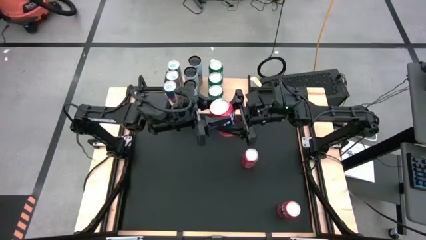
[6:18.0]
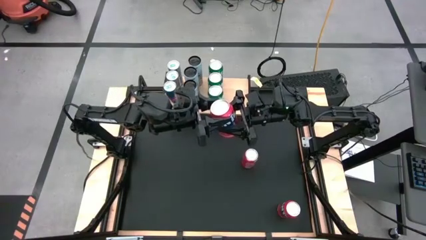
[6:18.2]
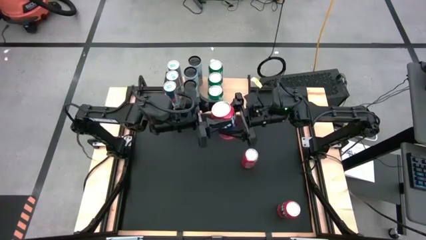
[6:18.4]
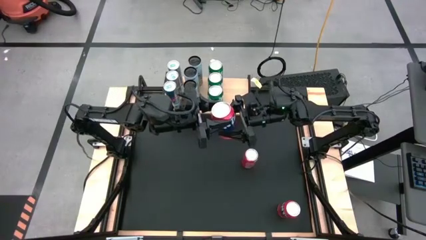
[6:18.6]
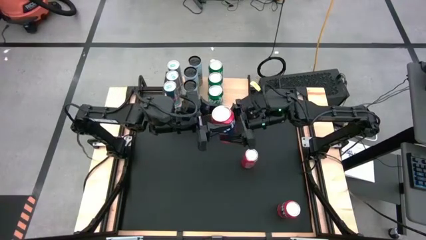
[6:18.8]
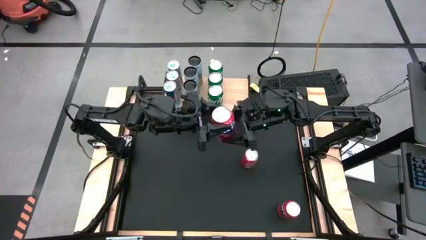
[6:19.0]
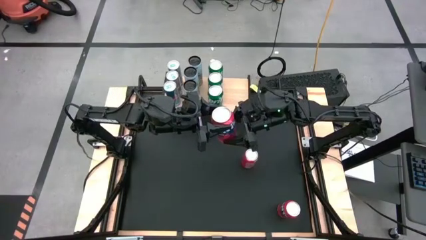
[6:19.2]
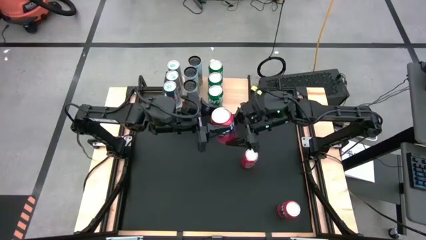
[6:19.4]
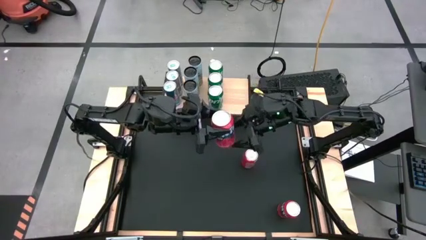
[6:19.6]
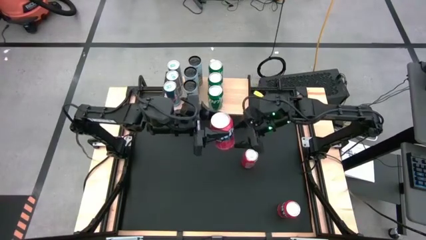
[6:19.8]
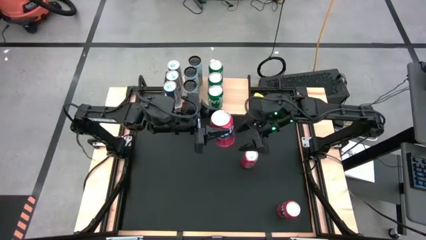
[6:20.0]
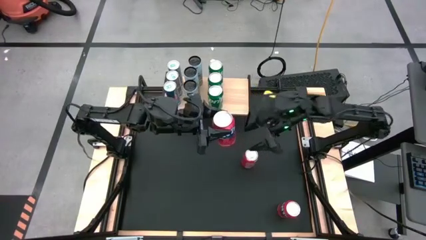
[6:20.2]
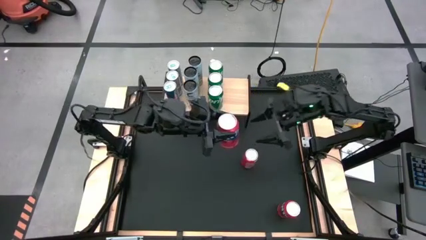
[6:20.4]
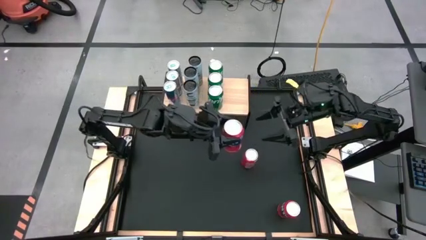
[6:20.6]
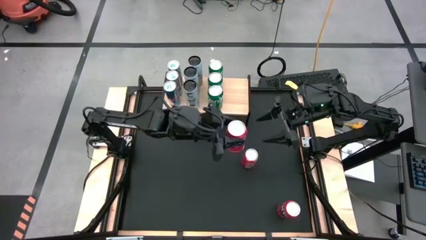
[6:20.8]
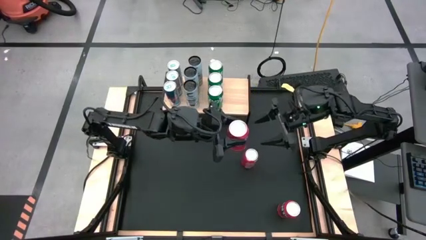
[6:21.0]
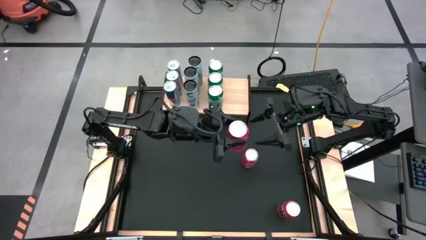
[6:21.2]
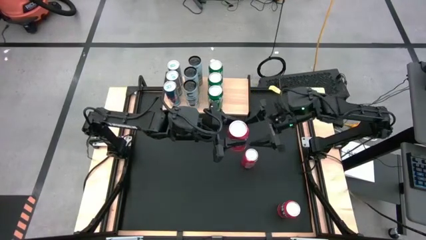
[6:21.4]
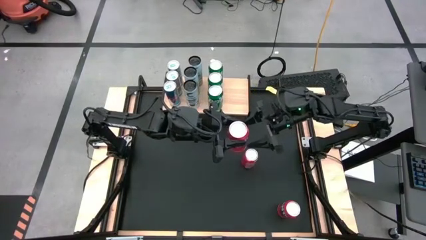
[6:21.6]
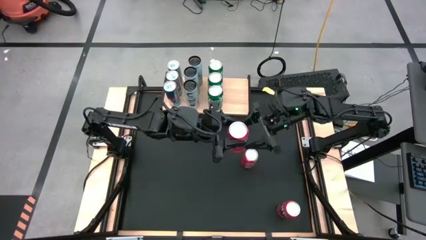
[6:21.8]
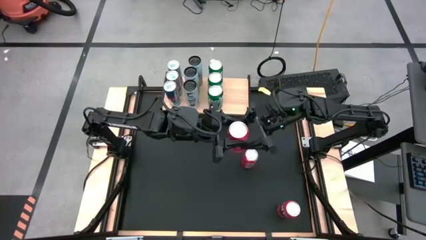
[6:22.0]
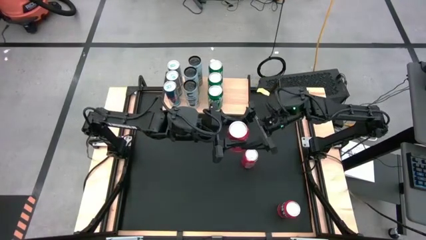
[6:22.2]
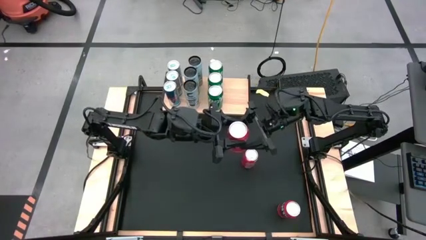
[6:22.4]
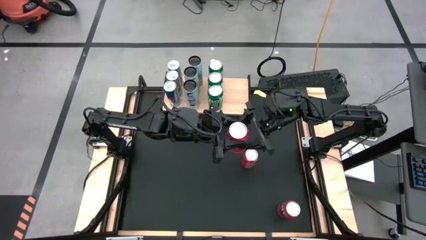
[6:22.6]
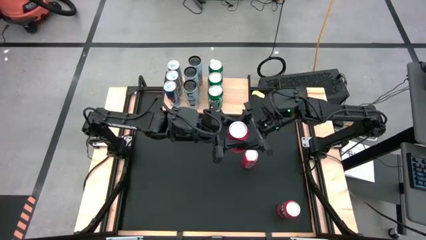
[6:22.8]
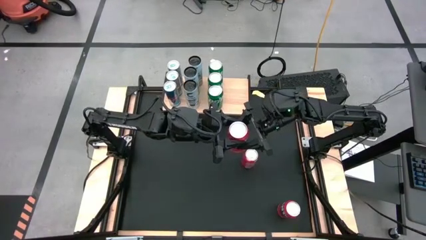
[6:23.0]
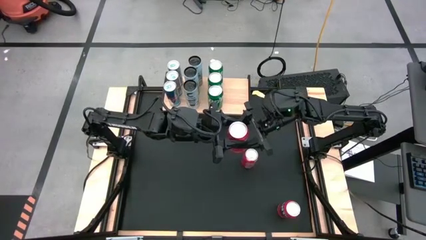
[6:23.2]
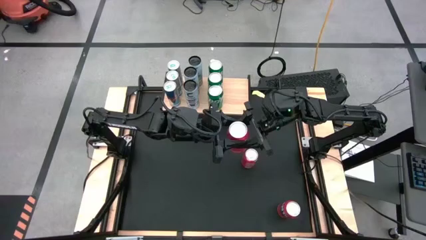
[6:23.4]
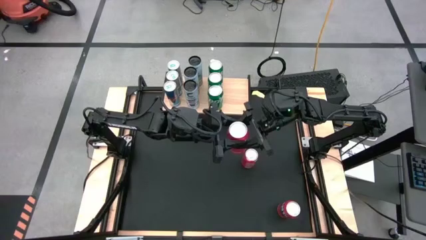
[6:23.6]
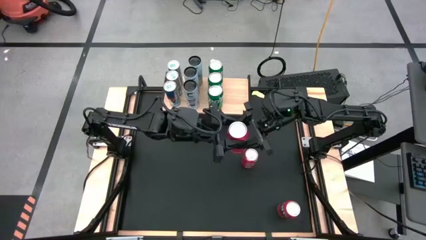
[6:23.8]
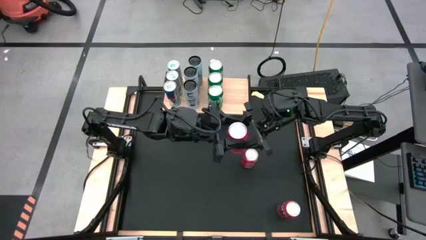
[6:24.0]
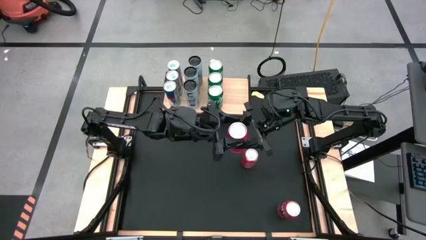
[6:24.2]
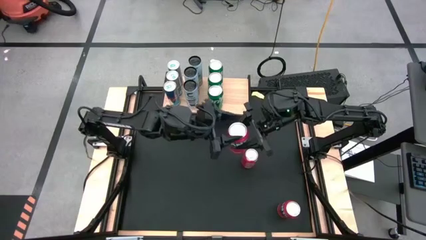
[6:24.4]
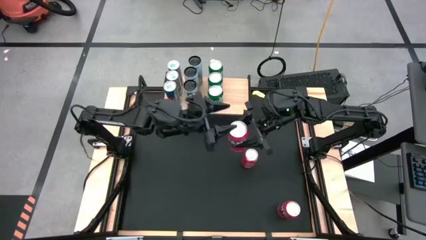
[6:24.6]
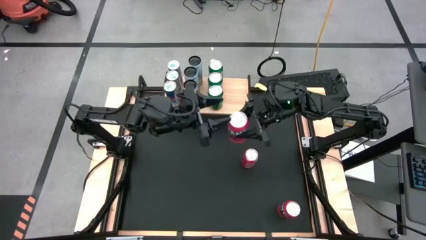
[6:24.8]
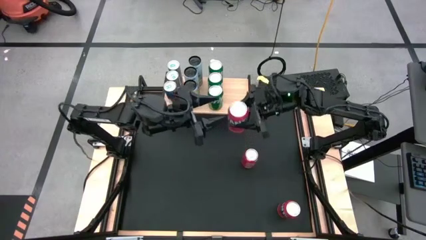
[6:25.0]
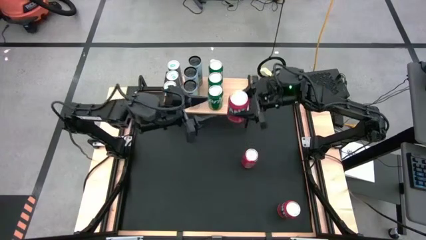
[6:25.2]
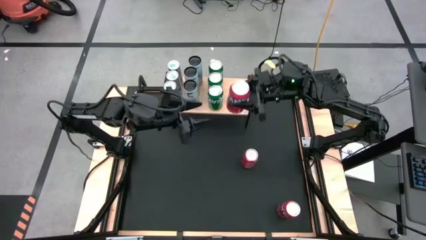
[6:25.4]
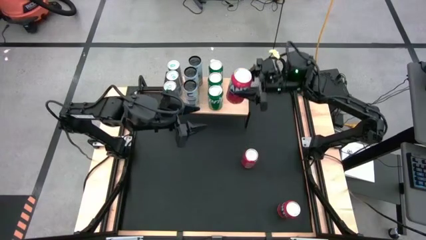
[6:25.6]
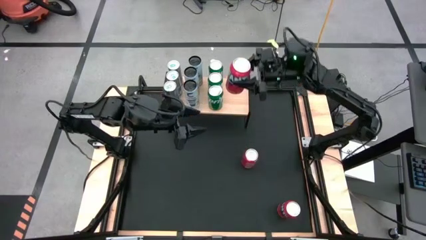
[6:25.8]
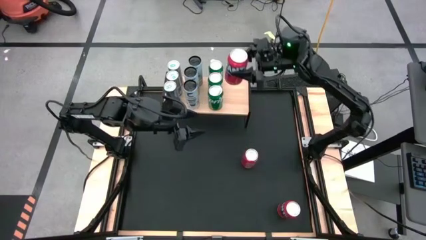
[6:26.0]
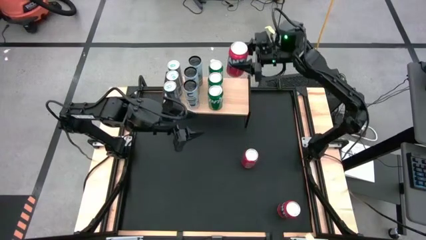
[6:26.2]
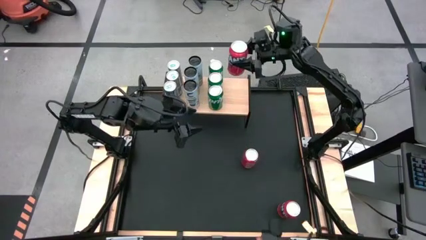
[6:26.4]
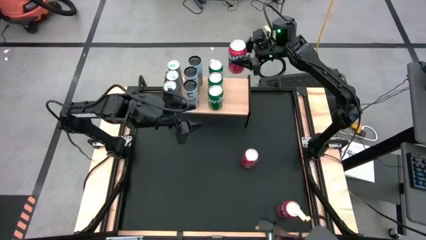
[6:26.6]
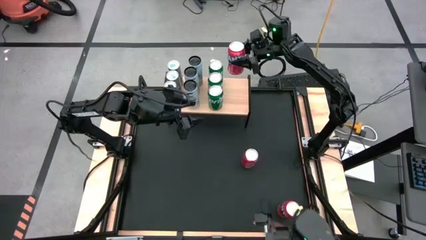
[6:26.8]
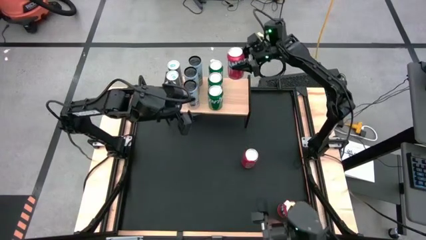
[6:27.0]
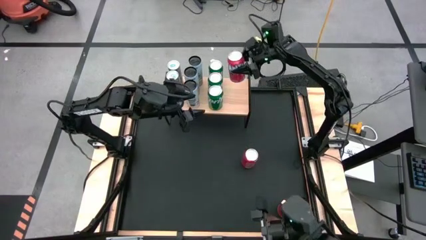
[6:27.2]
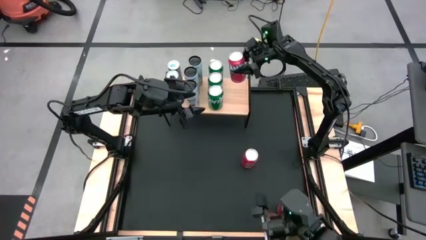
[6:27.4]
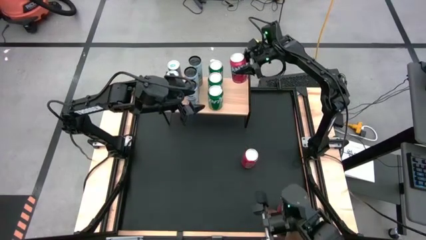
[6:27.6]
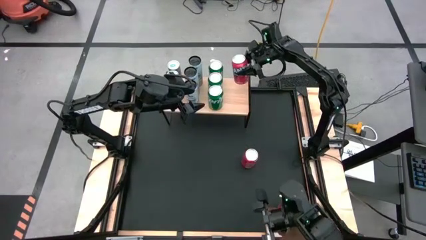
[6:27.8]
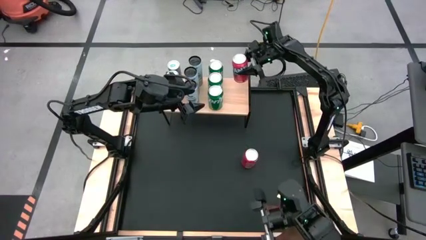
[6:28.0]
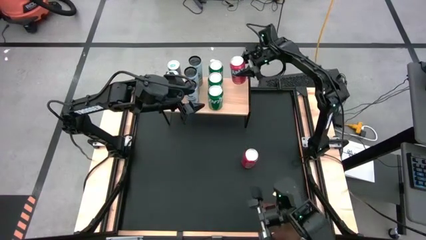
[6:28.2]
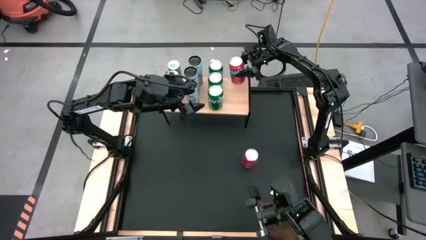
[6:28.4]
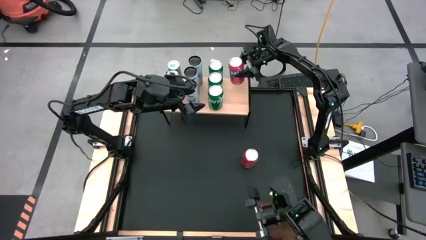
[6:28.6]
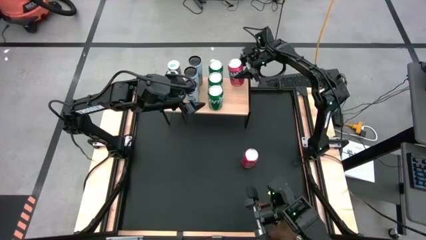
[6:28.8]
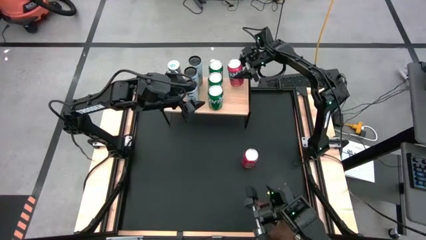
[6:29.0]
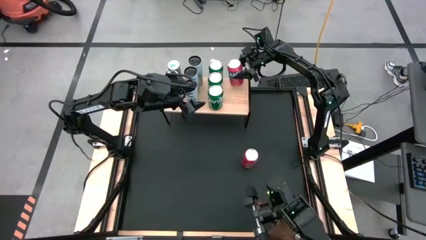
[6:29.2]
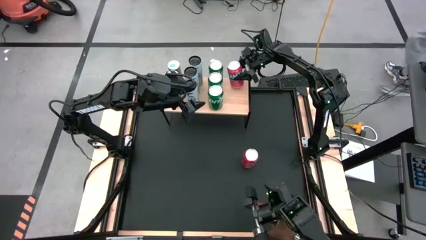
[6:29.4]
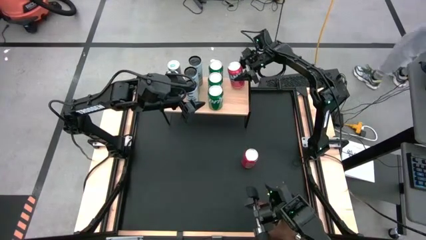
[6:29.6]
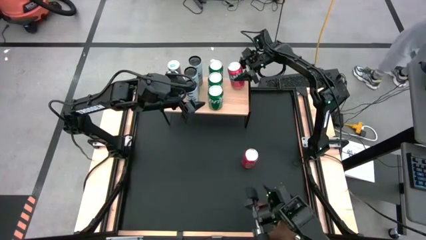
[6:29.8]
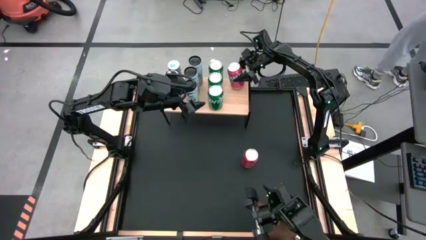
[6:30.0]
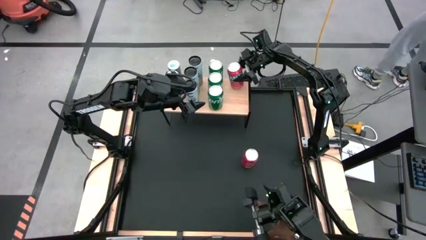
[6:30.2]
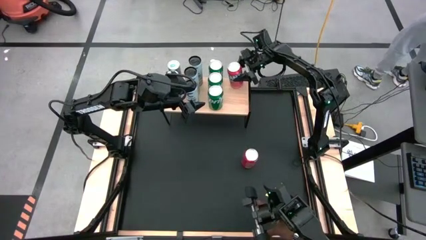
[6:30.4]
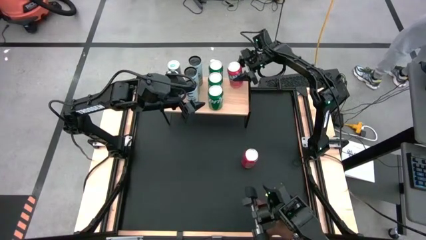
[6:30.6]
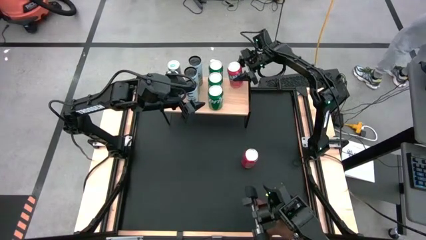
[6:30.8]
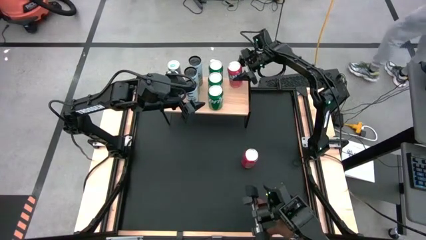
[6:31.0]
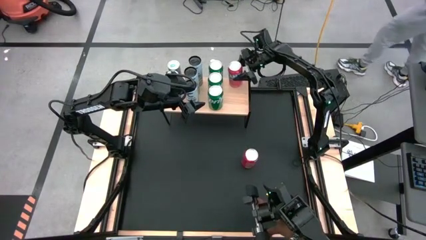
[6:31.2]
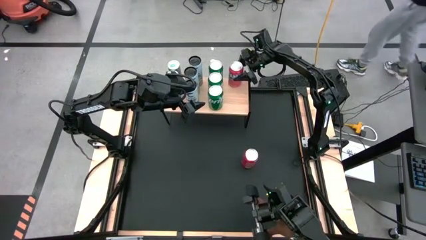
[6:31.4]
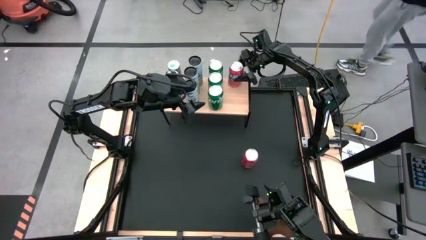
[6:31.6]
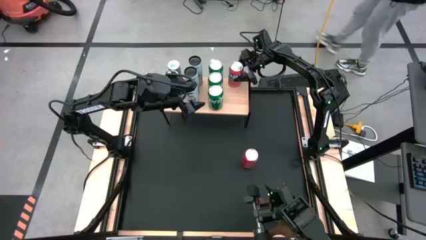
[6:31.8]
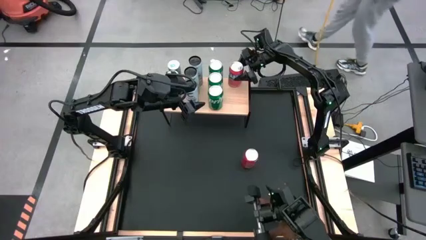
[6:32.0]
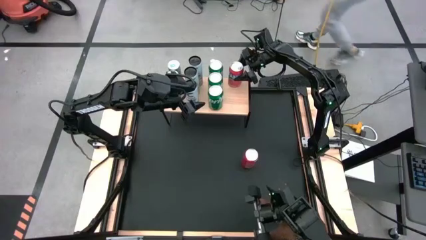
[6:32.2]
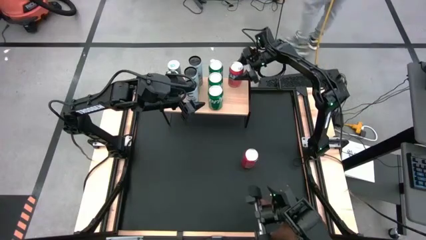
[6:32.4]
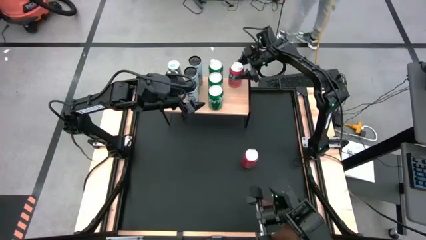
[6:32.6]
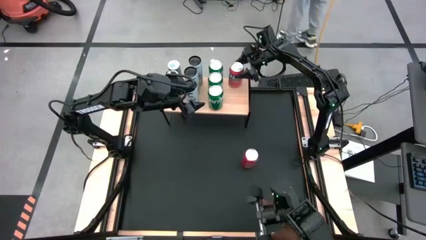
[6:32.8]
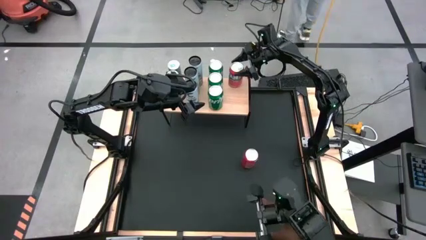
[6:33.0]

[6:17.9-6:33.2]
Task: Place canned beverage on shelf
Put the top left orange soda can on the shelf

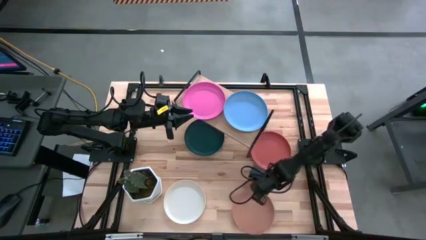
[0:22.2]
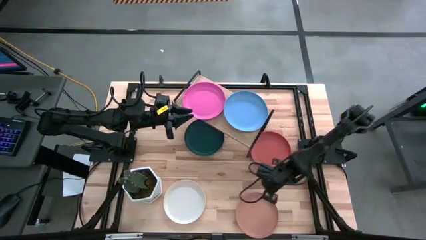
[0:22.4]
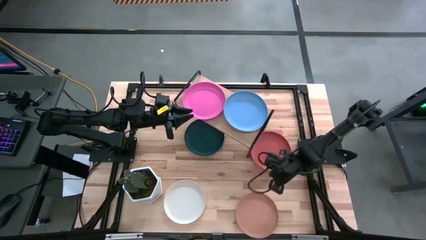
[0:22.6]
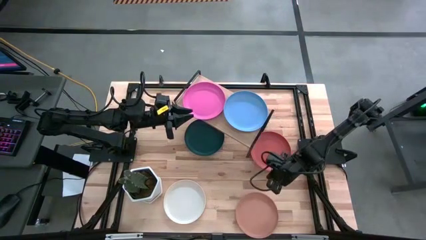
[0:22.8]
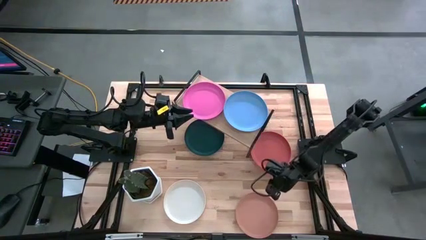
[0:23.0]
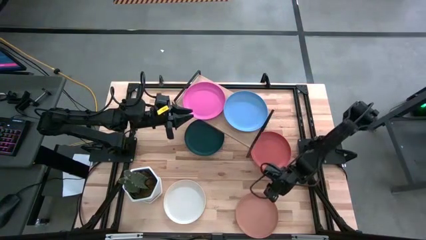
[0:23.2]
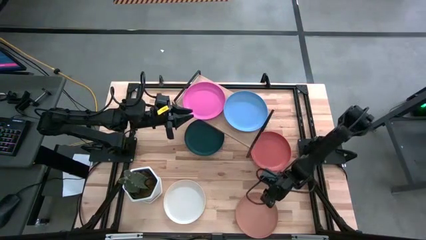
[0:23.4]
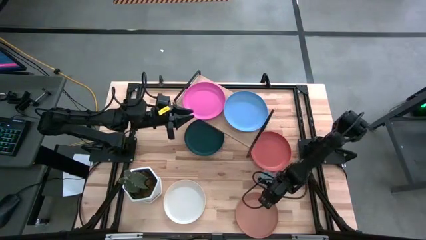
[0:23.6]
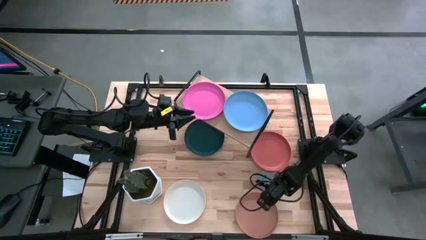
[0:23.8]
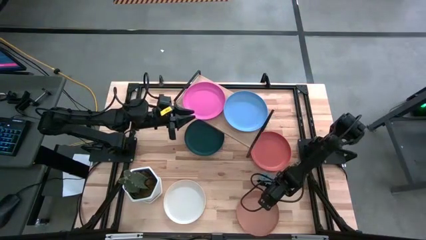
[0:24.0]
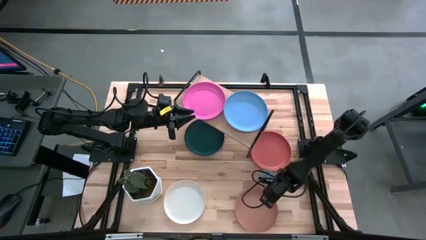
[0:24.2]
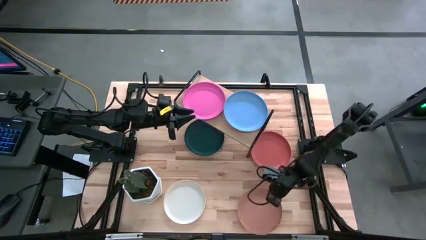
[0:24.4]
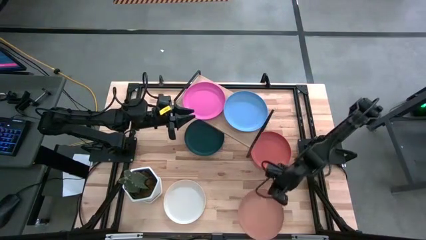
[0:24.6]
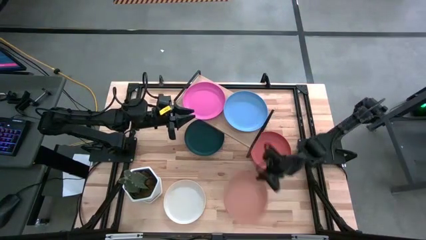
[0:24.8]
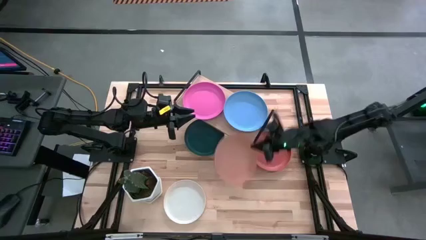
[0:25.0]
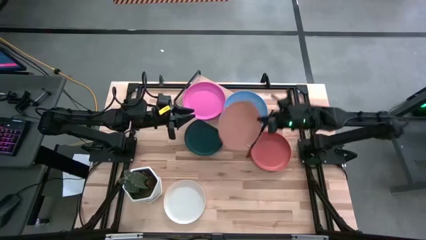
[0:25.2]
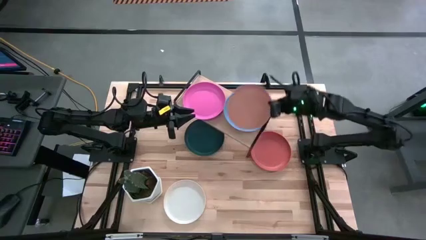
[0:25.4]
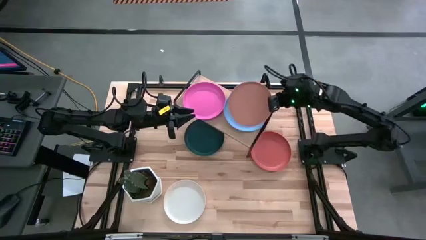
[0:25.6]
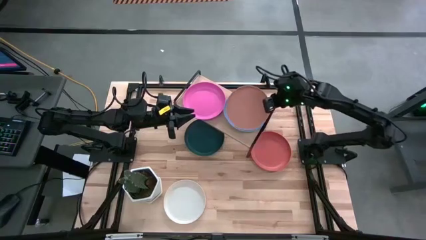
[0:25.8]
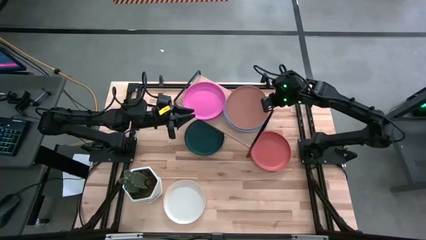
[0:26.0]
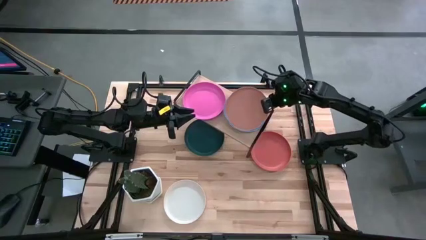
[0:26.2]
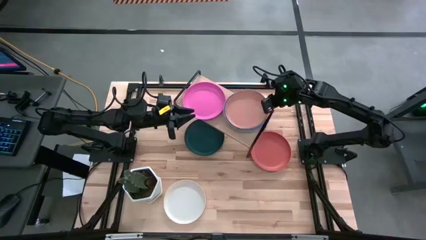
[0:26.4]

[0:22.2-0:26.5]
Task: Place and stack plates onto a shelf
Stack the brown plate on top of the blue plate
